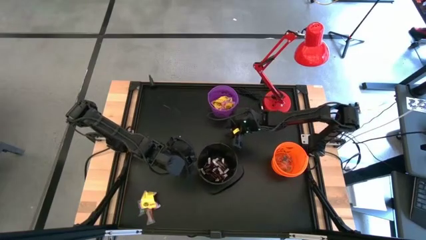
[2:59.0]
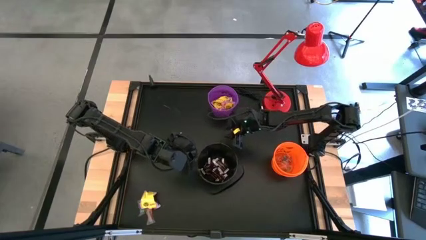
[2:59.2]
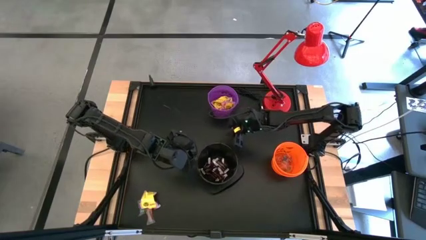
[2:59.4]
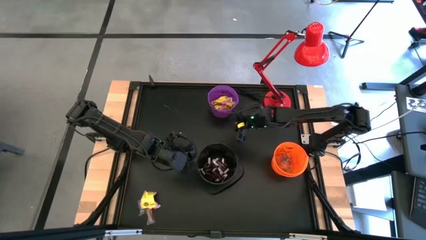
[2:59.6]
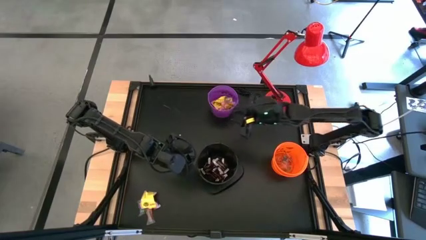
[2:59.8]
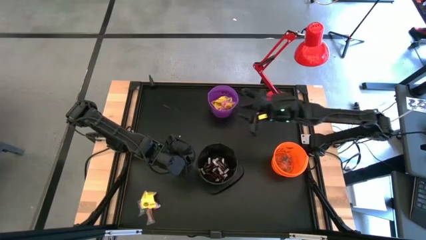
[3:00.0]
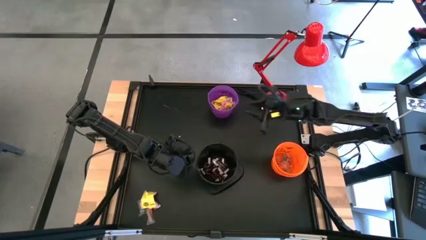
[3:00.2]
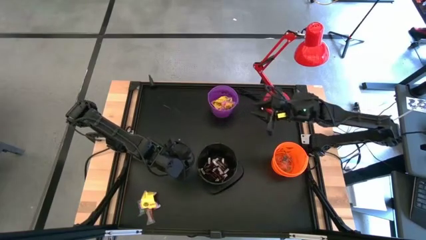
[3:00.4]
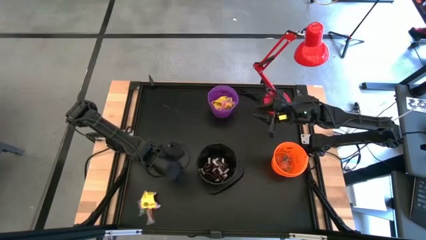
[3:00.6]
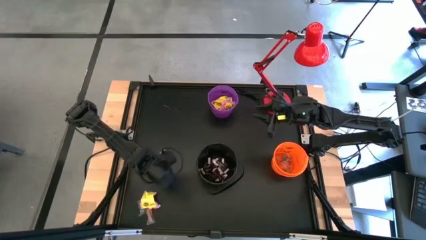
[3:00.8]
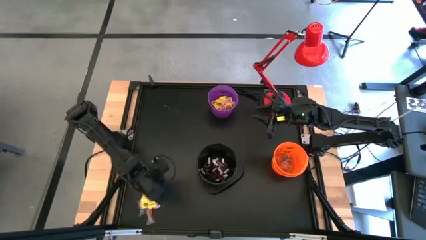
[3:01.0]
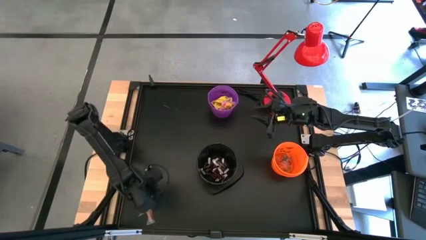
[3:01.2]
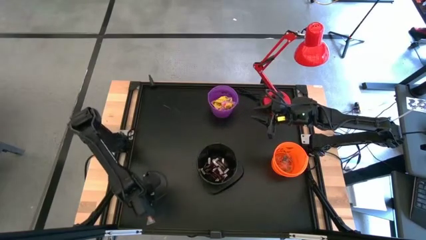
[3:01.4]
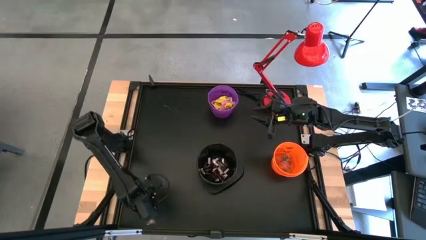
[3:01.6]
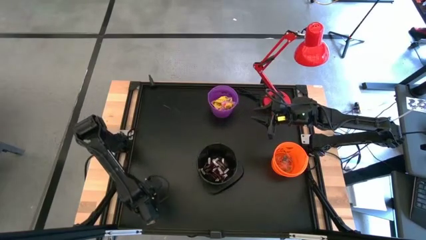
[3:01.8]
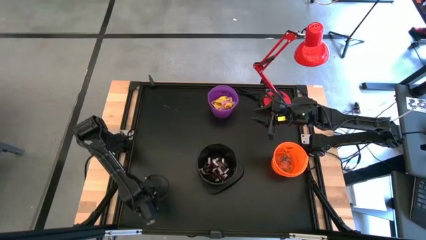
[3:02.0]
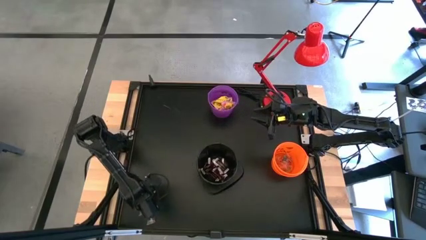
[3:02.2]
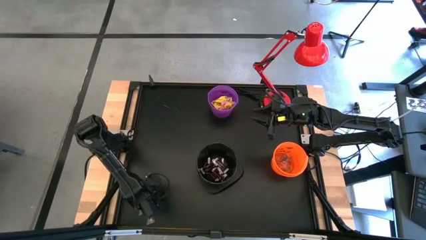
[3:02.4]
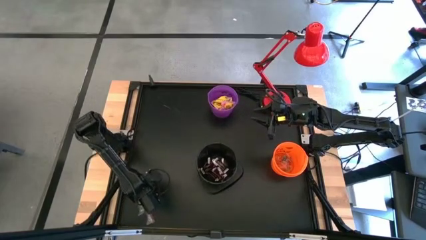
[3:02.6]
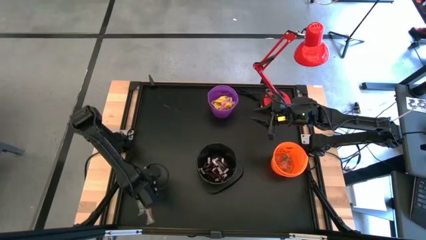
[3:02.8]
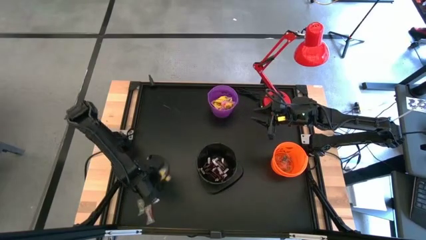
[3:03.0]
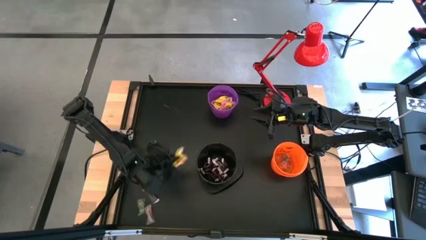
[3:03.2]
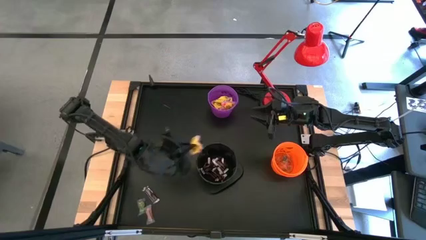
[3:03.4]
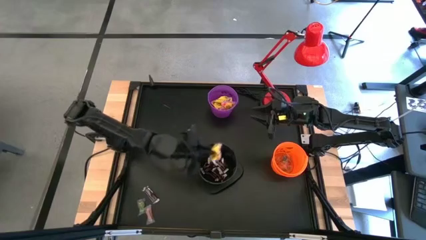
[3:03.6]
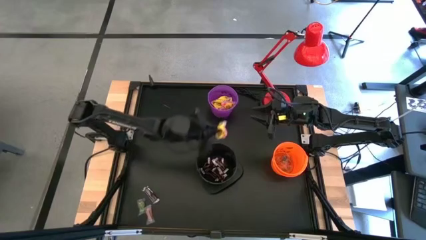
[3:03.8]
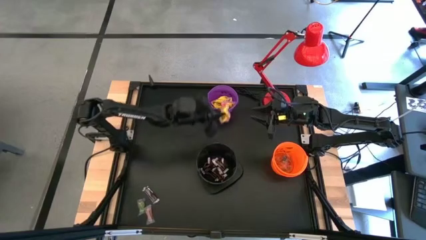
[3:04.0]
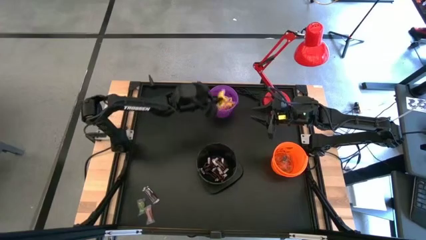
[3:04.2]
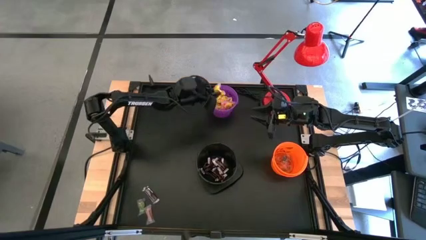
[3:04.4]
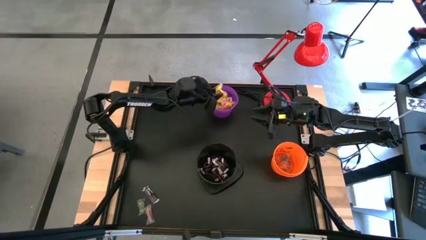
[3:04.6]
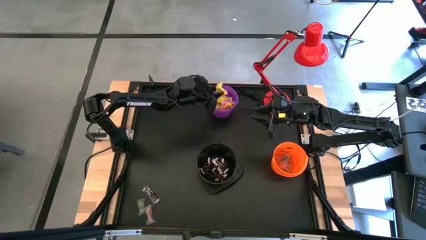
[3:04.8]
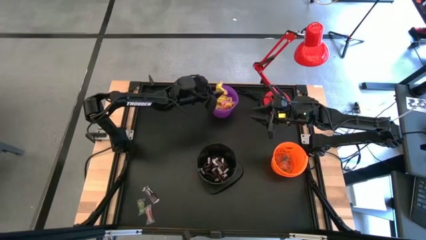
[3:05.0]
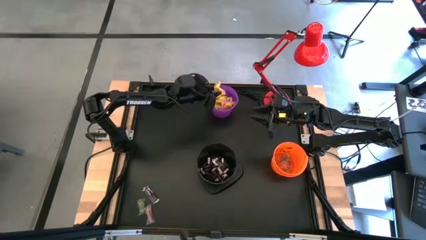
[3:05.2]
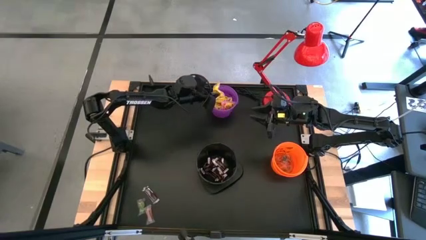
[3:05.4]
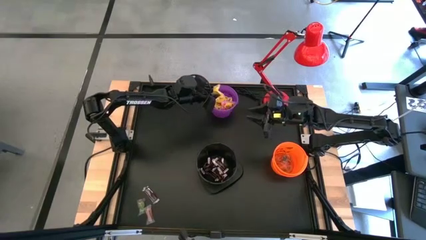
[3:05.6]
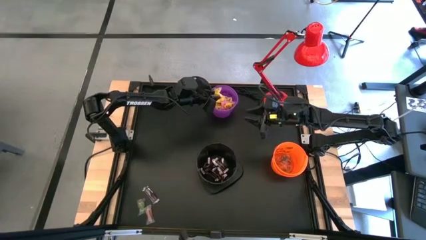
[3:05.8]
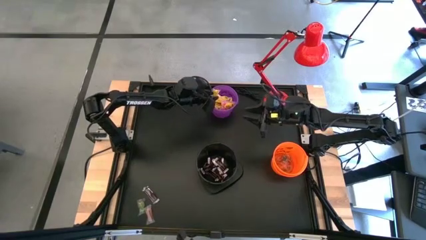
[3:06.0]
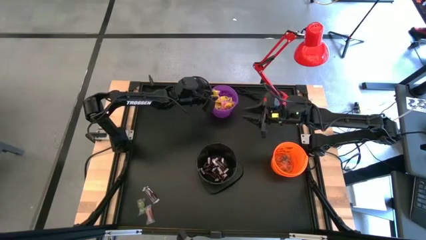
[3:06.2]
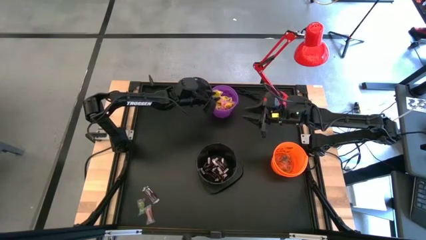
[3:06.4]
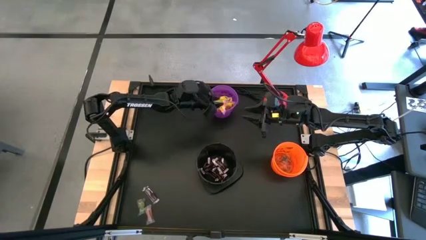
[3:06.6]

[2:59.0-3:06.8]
Task: Sort candy
Put the yellow candy into the purple bucket

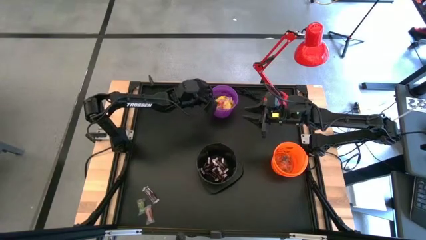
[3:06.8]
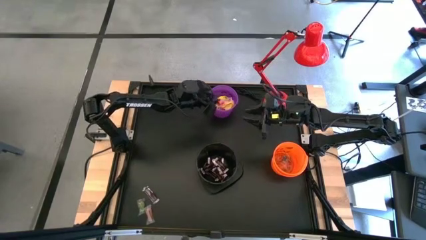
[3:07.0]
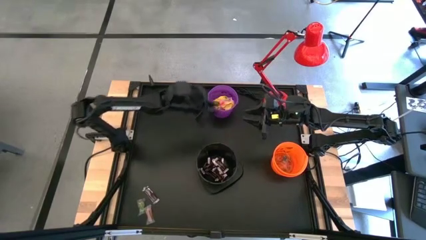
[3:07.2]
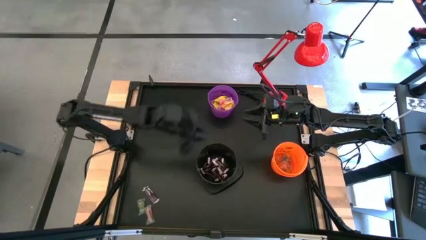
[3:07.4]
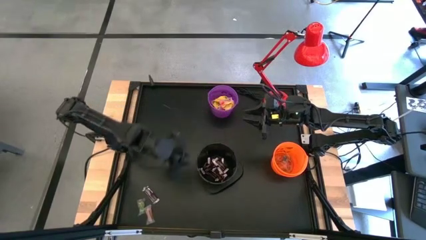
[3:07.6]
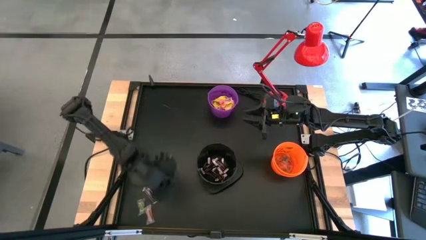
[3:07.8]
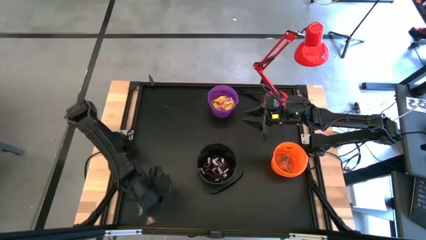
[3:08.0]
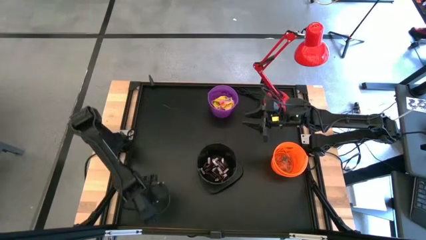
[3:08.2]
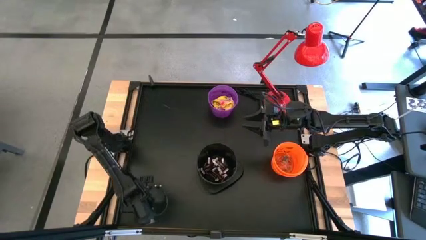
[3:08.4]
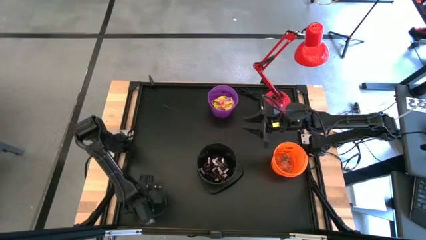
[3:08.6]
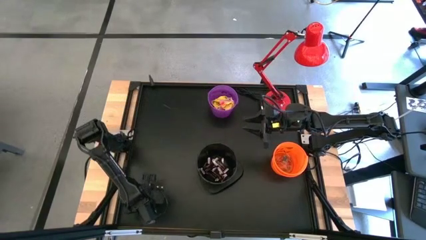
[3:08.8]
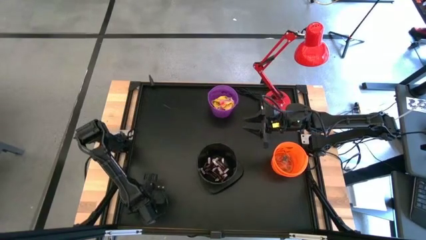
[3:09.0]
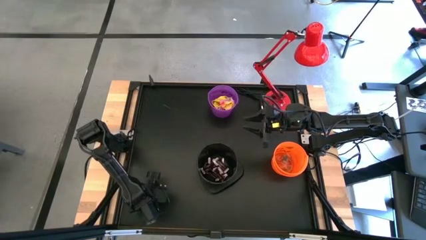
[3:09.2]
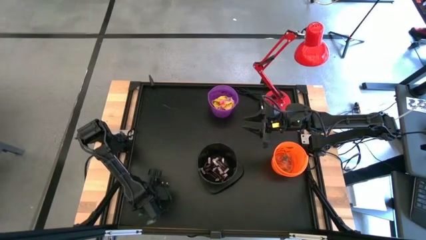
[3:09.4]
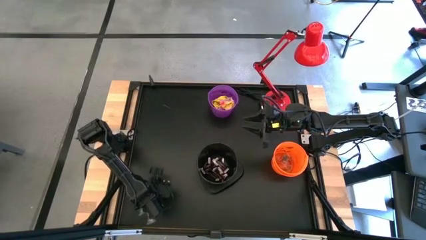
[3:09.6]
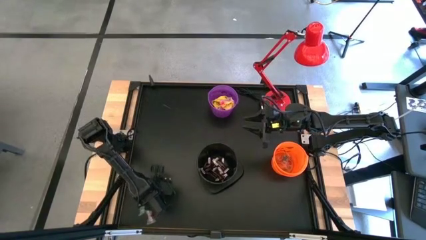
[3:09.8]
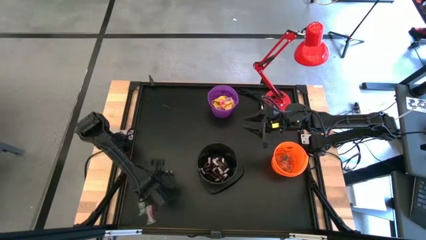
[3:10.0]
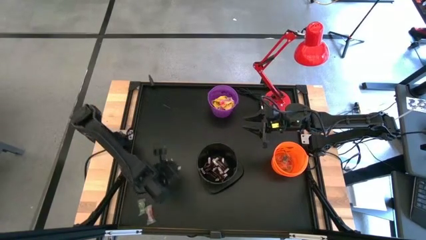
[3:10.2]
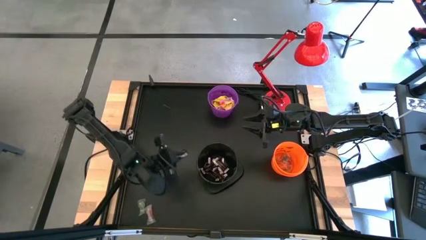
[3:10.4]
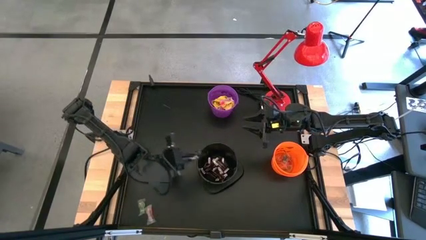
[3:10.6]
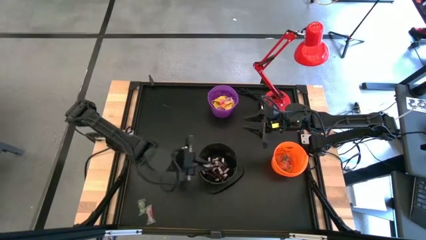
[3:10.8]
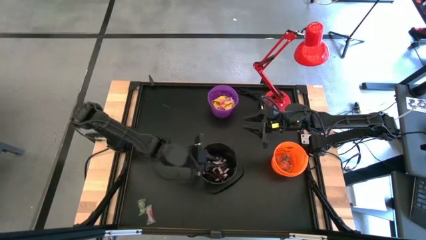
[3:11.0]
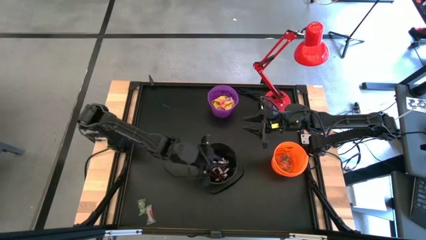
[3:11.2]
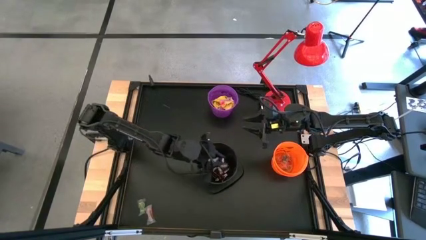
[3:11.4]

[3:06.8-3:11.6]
Put the brown chocolate into the black bucket

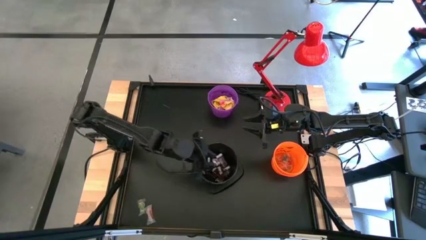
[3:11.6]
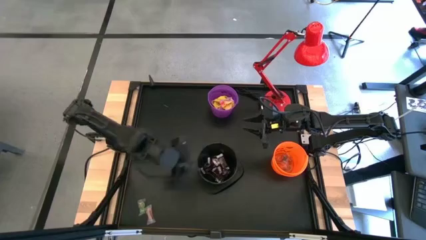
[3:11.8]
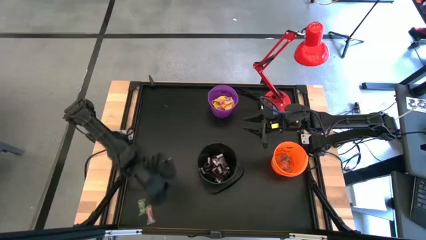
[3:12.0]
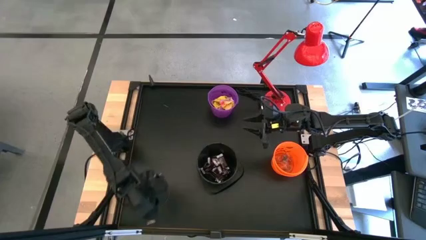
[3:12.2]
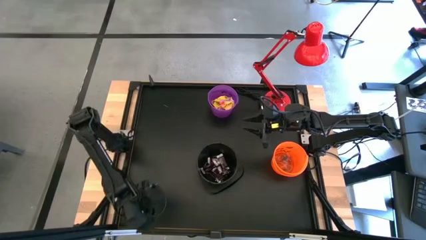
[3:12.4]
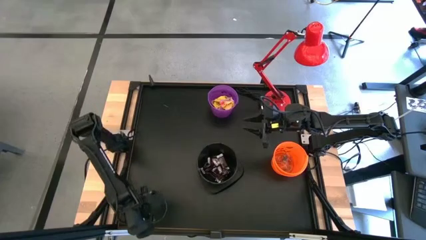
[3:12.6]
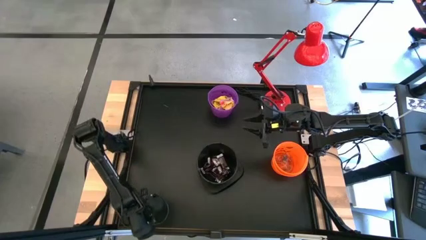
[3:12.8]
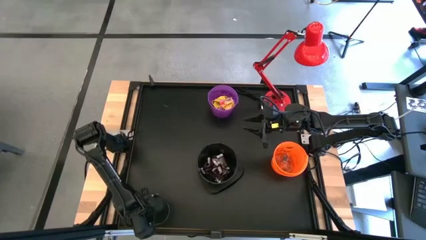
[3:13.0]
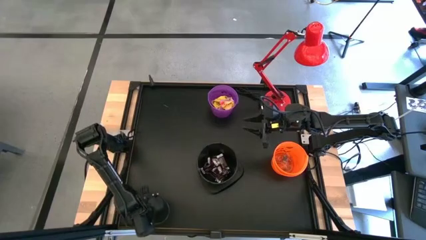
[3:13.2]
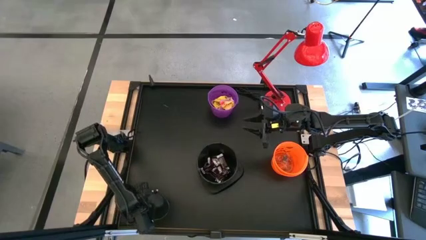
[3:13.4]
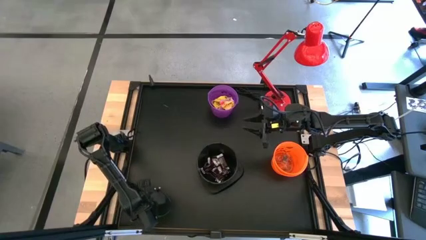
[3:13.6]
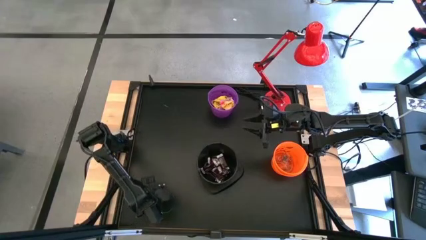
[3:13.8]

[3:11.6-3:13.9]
Put the orange gummy into the orange bucket

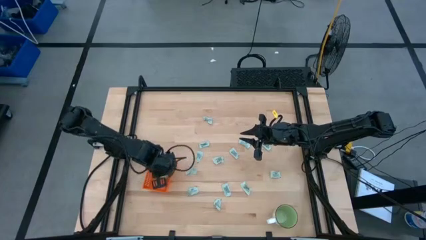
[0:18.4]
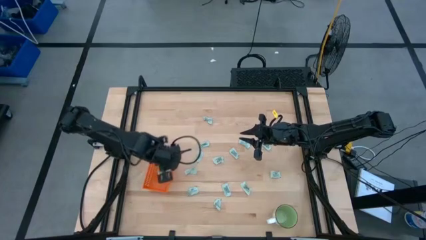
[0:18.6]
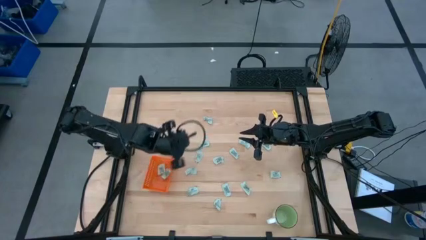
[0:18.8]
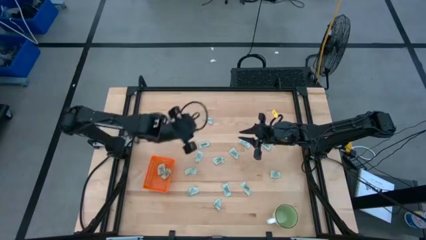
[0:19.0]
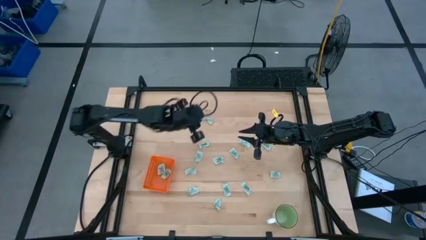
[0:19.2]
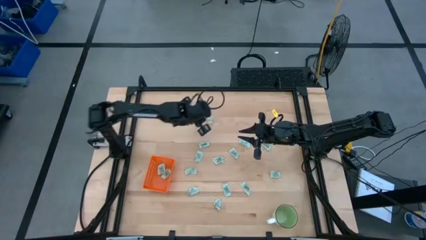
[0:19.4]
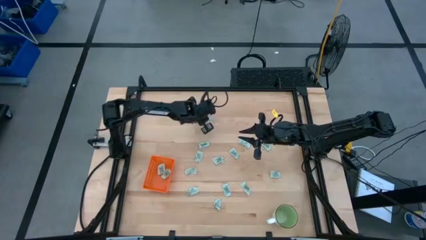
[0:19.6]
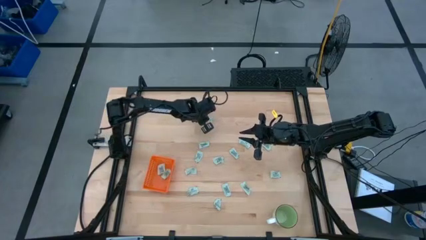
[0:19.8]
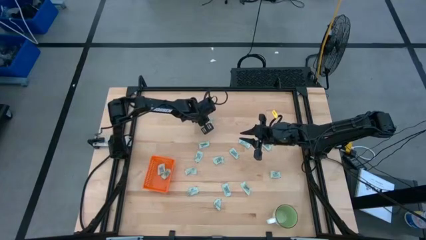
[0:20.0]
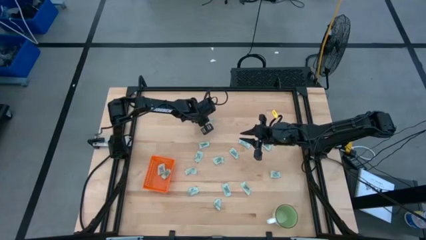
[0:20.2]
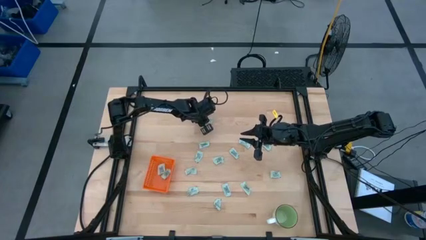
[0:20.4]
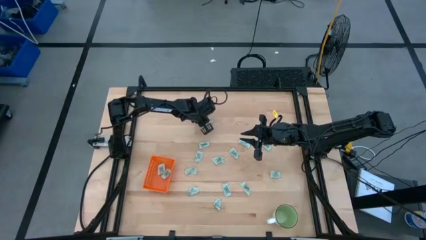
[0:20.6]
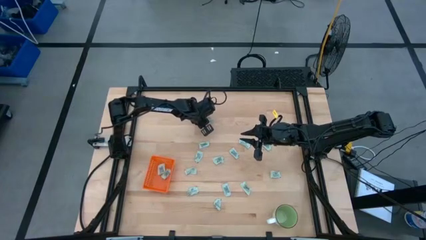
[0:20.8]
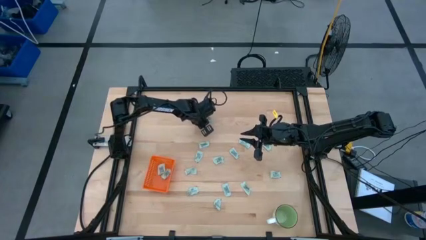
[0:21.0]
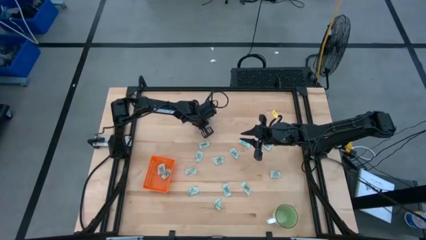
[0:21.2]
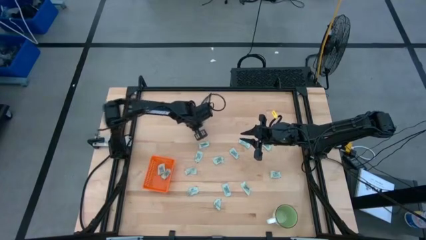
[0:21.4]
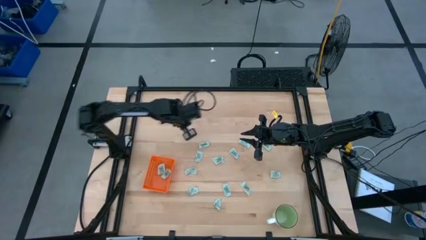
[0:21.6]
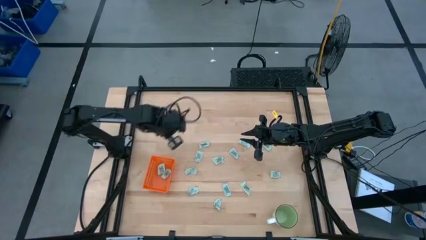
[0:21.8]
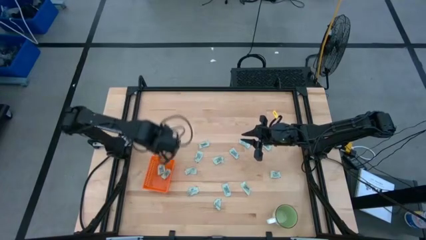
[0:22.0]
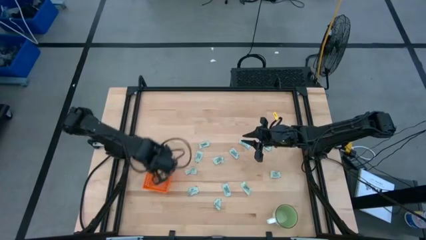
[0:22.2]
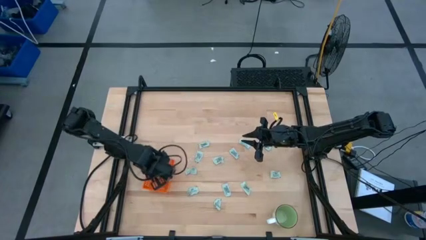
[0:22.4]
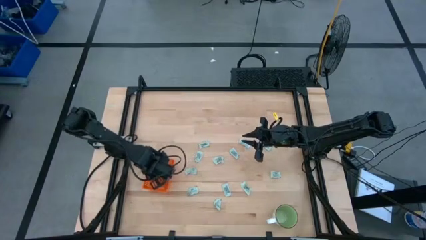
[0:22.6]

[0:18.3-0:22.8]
Task: Pick and place Stevia / Truvia into bins
Put the white stevia packet into the orange bin
